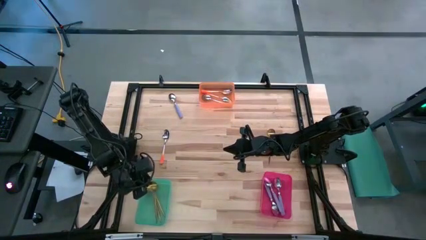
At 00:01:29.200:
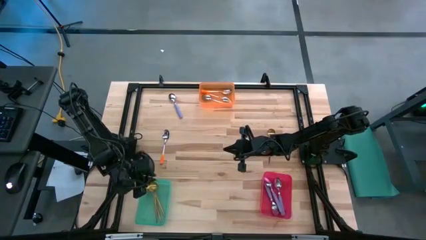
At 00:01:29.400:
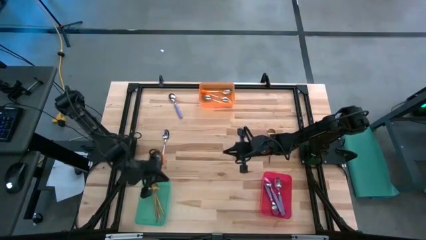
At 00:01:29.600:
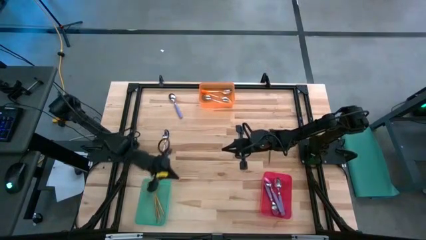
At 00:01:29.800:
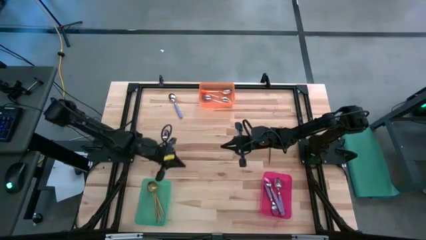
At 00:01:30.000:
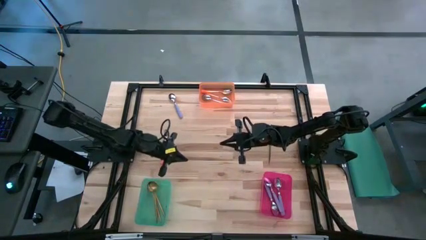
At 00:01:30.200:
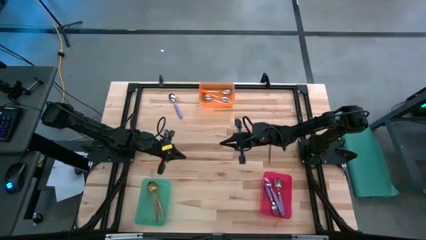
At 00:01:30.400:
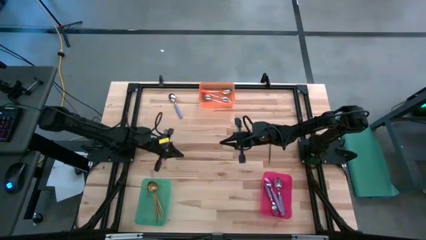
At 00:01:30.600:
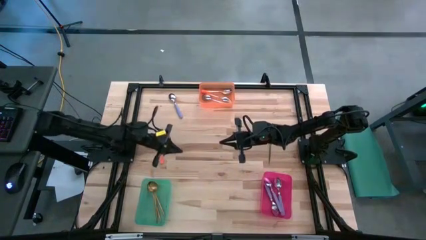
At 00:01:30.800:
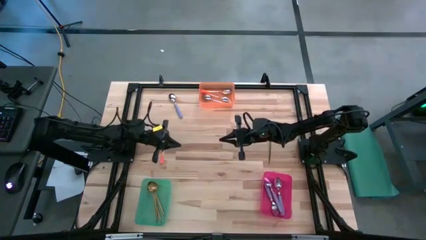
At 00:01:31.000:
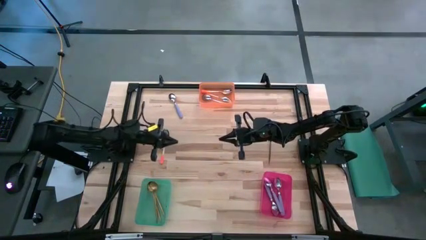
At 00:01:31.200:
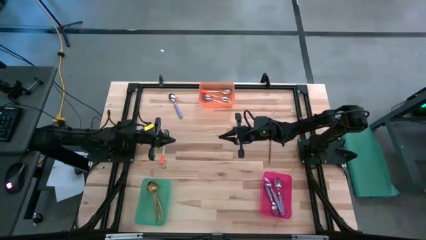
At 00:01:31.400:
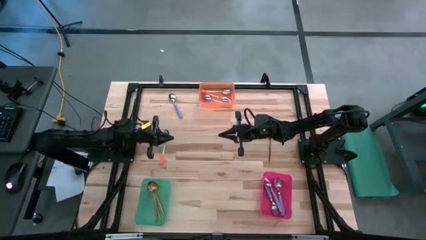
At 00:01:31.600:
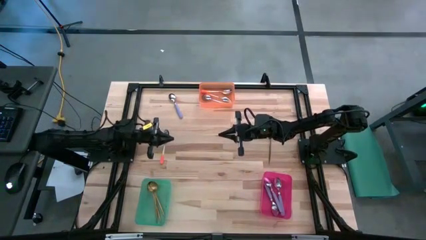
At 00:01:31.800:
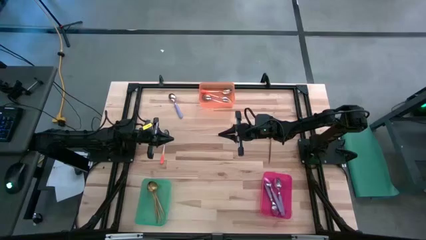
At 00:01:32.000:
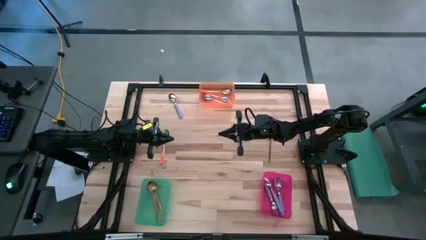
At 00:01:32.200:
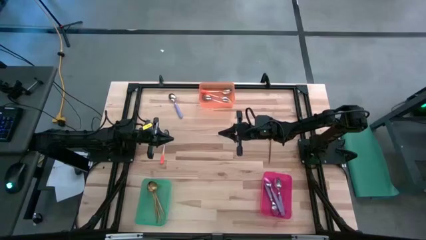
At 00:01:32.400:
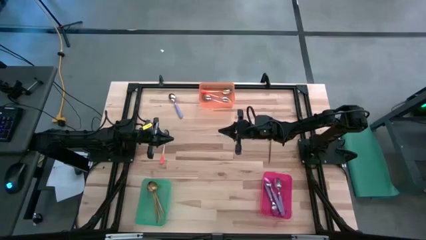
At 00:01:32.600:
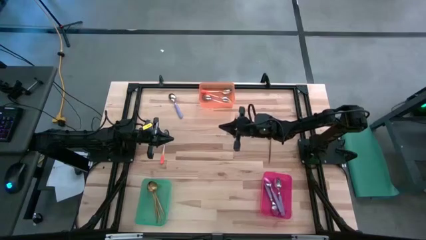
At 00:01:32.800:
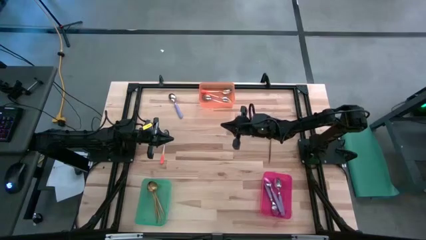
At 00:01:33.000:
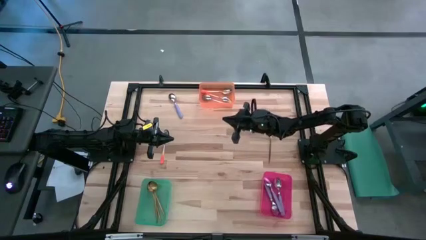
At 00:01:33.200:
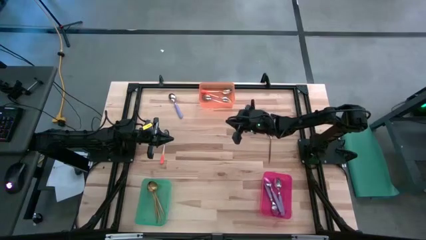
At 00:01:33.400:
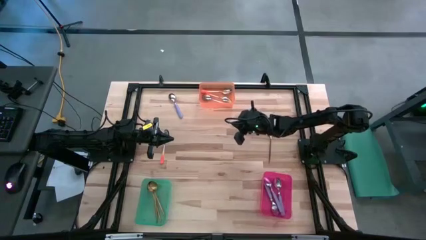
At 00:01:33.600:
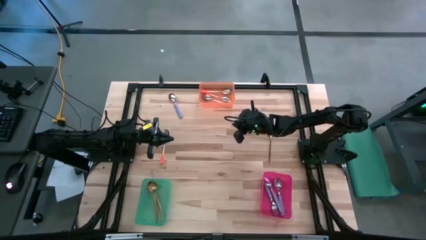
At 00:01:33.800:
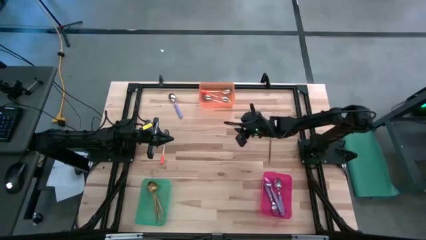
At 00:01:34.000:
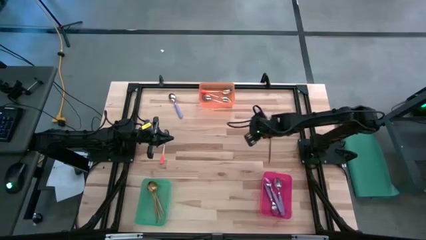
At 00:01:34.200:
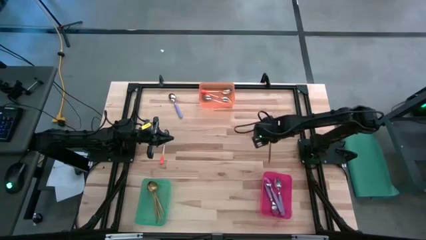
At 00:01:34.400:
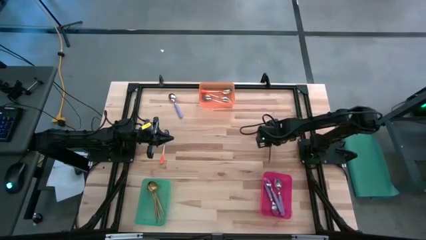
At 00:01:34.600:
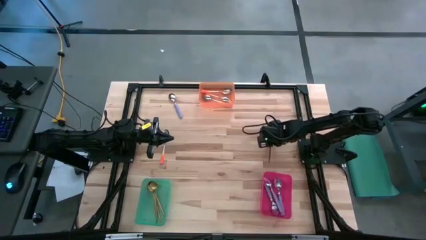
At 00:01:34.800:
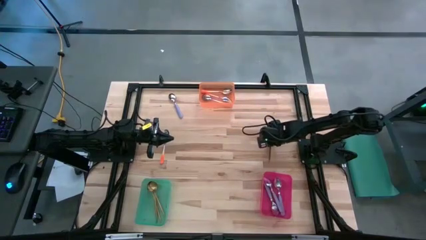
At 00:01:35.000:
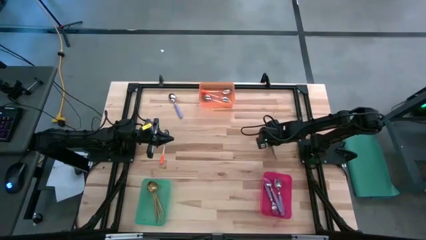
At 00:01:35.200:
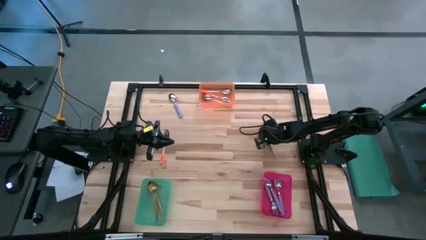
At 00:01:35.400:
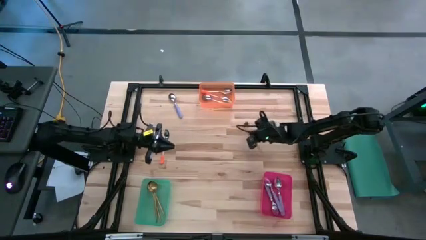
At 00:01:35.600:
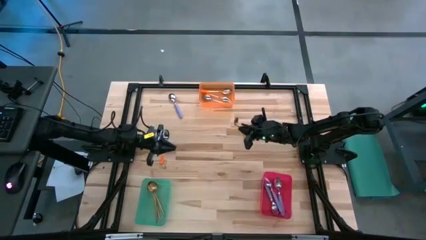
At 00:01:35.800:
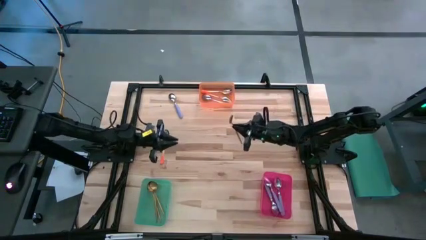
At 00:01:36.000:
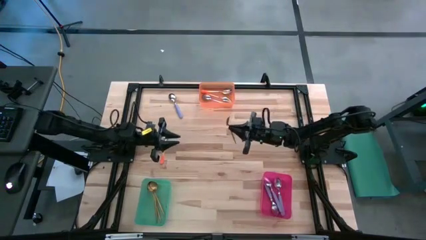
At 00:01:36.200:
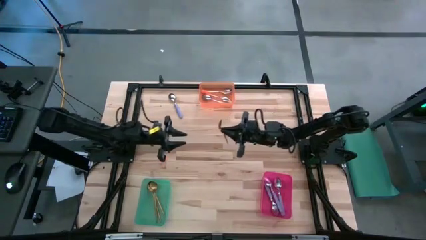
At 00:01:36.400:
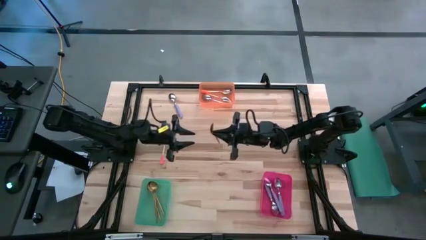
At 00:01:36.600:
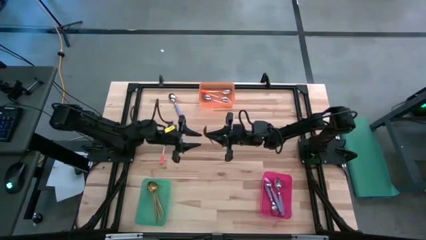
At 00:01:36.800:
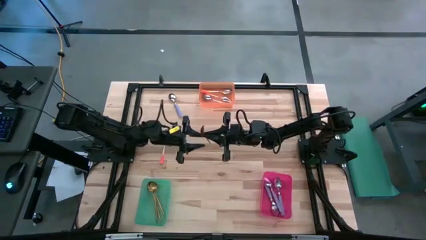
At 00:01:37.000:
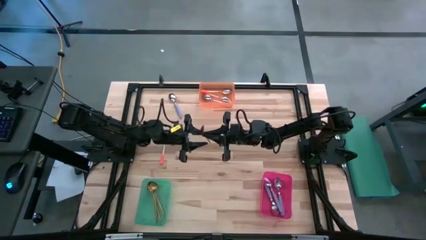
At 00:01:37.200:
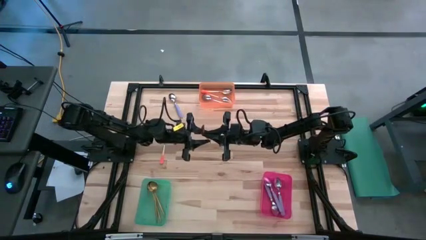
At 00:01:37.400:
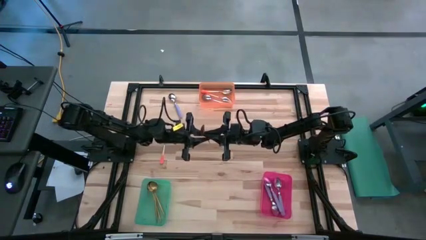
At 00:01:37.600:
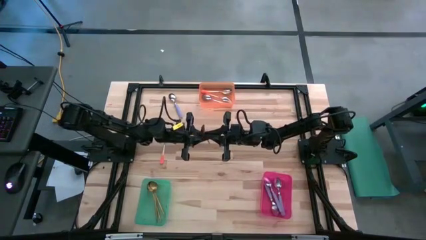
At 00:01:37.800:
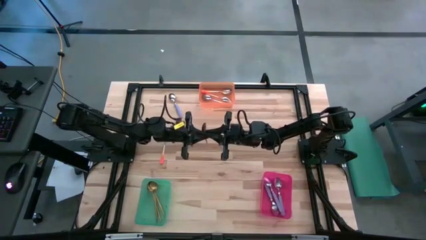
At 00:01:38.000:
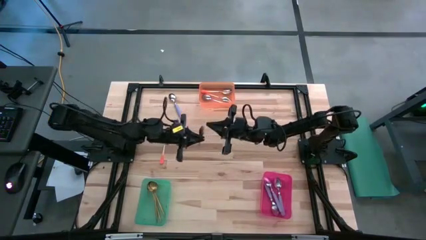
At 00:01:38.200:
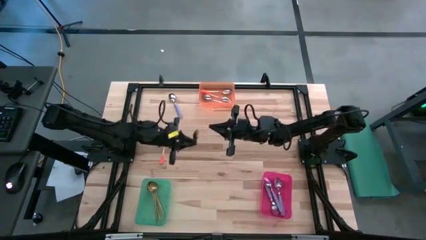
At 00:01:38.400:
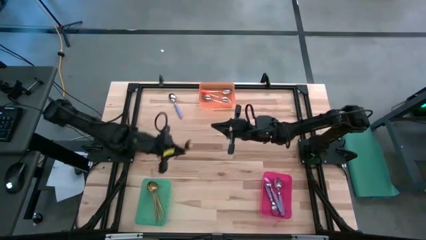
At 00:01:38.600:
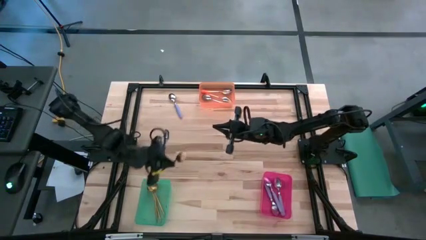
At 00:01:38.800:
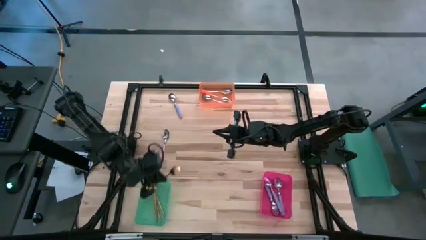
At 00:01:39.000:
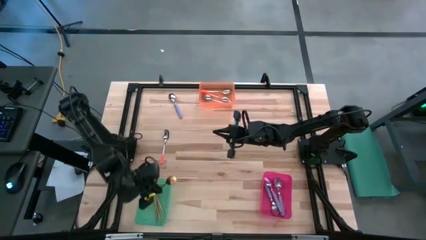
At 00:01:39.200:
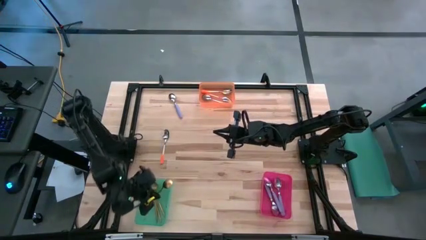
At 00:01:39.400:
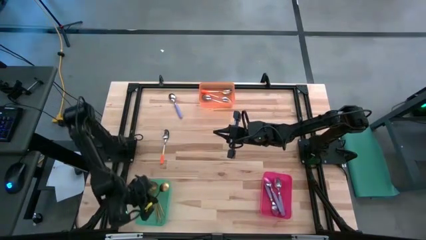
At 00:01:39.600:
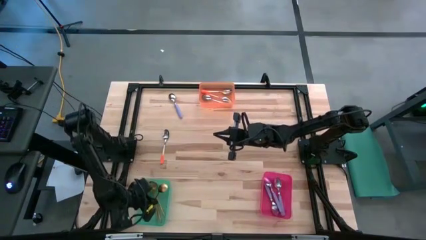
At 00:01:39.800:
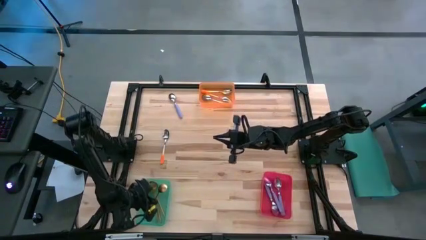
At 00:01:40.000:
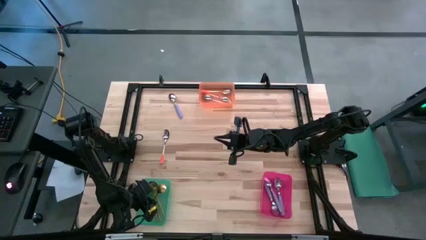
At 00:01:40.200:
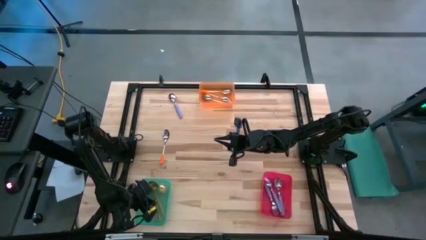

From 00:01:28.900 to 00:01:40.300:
Task: Sort silverware by color (type)
Put the golden spoon into the green bin

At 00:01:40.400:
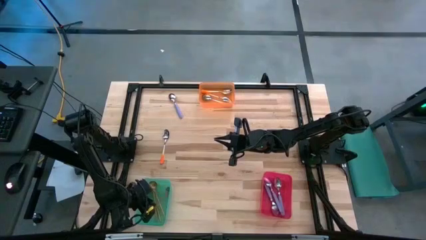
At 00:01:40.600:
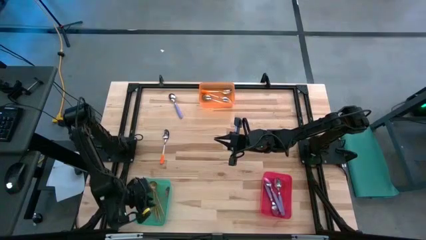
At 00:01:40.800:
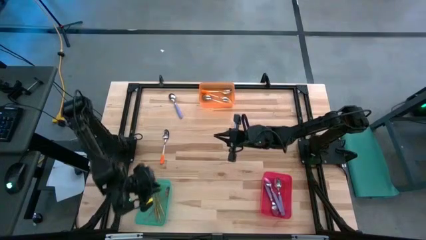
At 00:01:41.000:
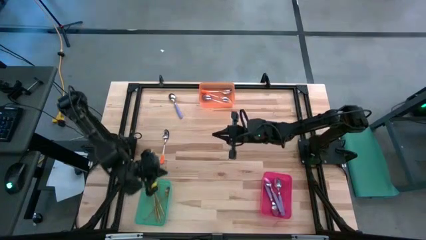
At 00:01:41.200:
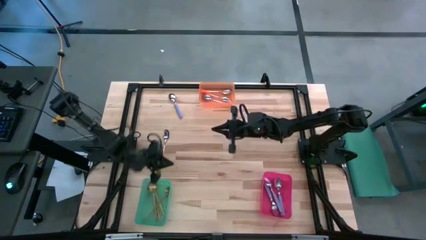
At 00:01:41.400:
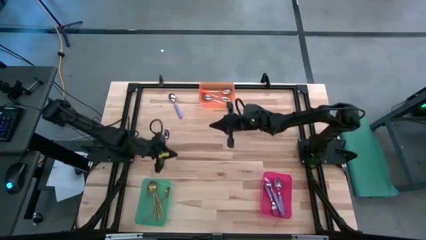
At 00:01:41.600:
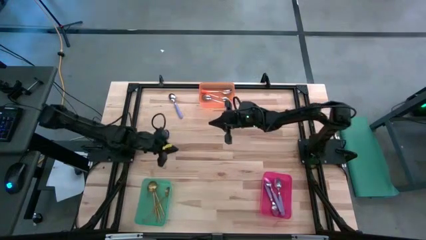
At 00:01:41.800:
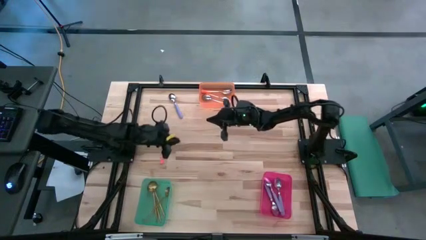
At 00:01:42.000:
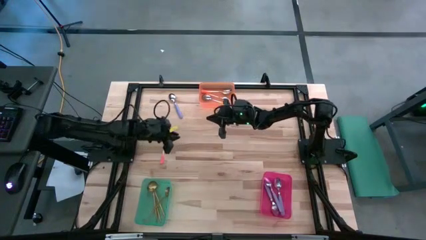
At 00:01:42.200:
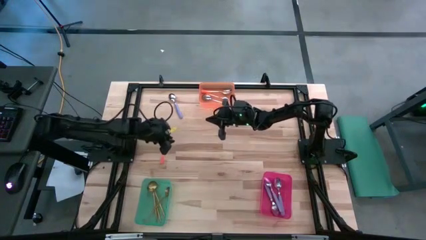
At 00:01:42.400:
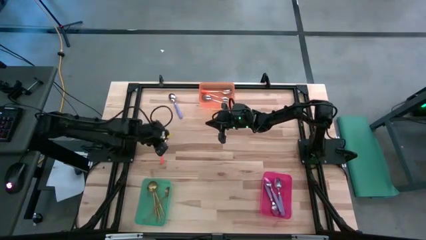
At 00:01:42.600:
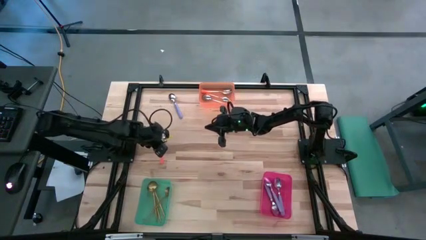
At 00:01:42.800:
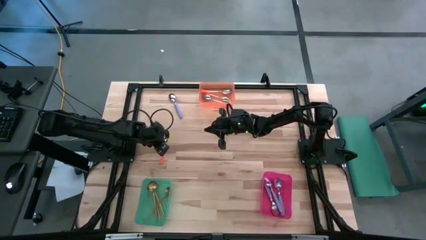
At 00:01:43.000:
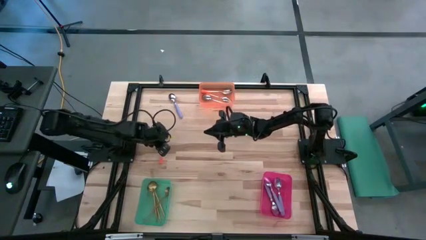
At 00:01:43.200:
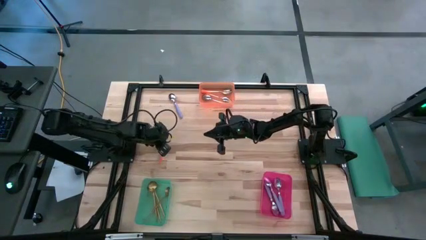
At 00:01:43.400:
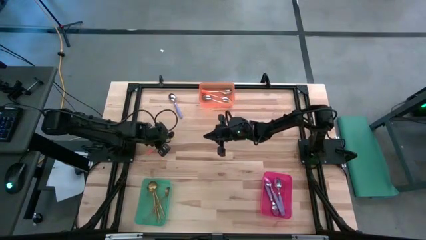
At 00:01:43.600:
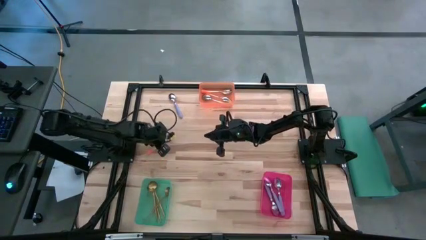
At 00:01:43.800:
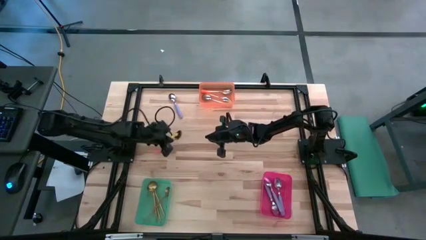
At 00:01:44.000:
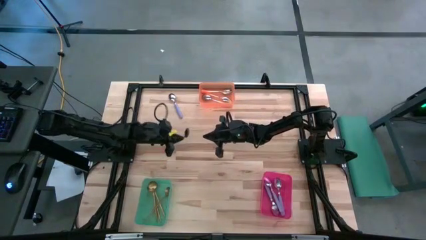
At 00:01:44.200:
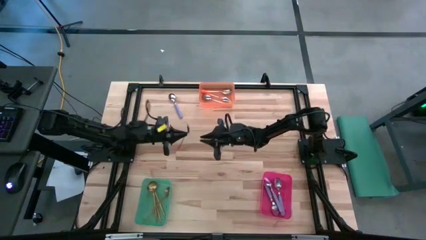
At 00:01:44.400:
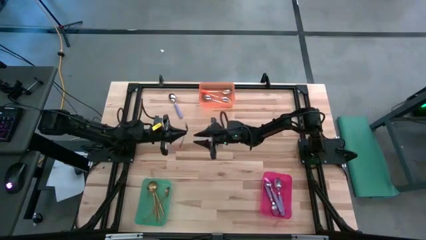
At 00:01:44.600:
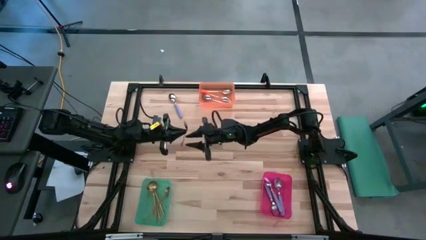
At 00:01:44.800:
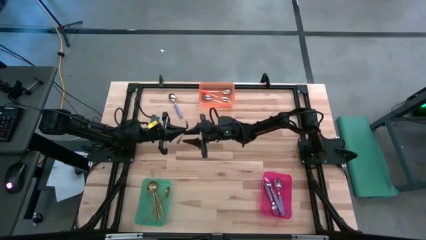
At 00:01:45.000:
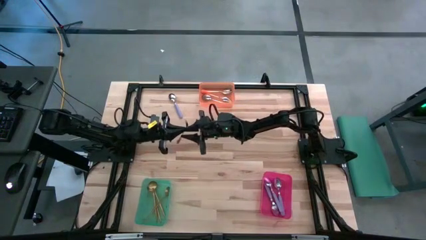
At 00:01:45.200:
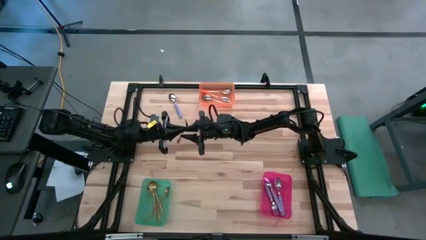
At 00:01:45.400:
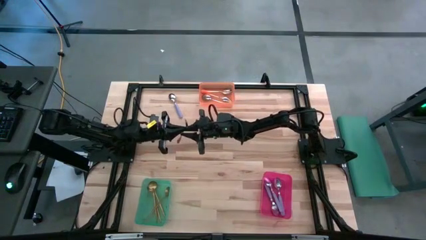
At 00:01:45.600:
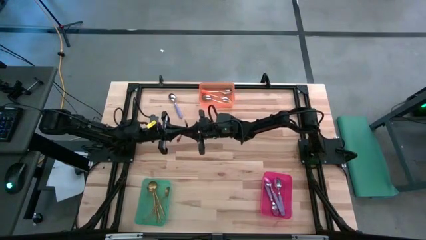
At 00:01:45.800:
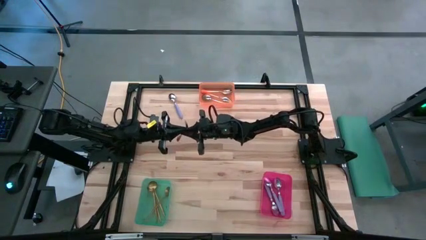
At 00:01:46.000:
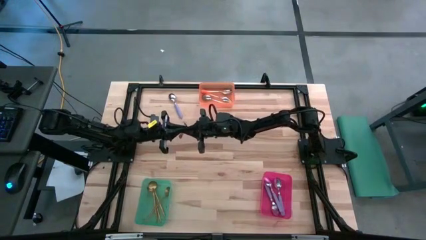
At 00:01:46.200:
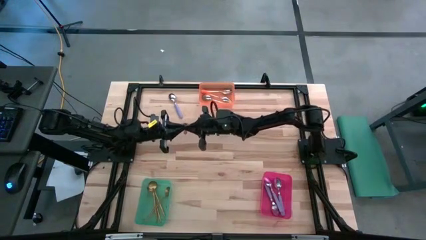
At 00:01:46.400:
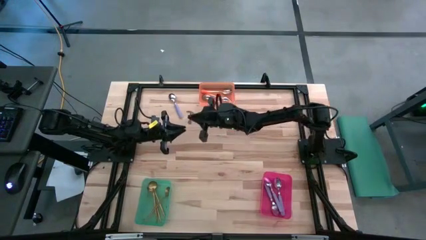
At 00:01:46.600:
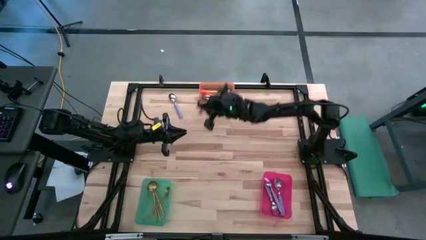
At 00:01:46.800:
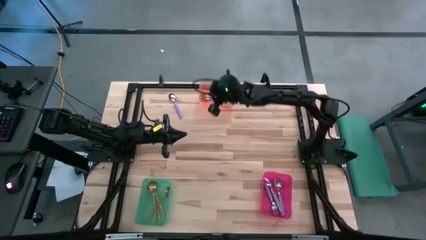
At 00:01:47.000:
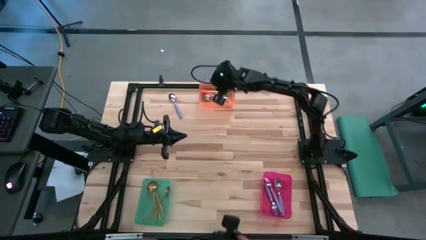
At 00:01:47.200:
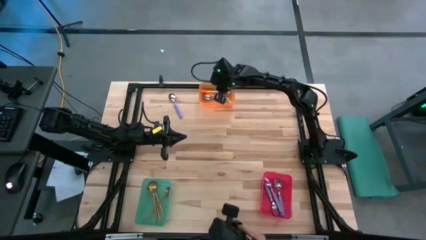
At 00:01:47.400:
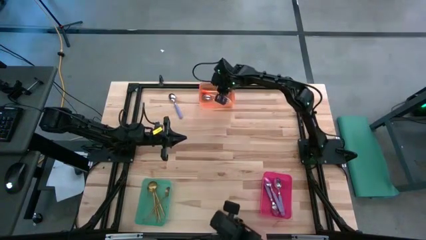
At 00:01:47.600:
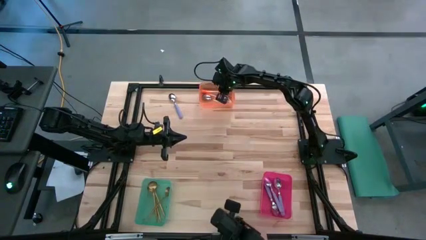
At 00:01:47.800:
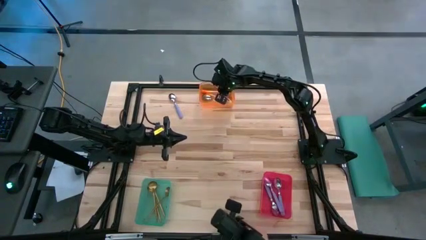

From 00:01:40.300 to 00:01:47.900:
Put the orange spoon into the orange bin
